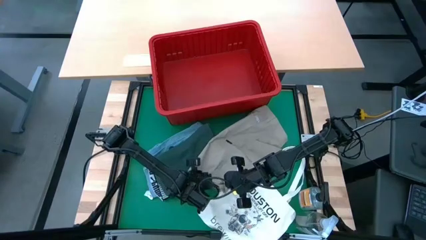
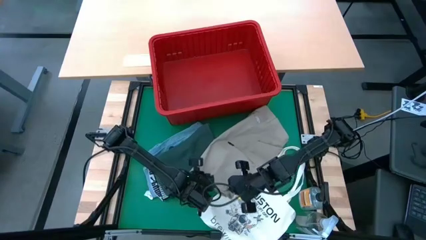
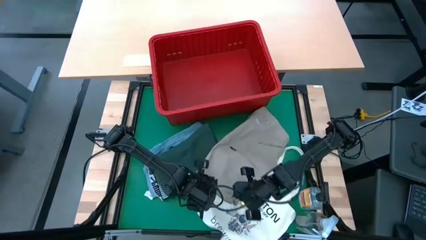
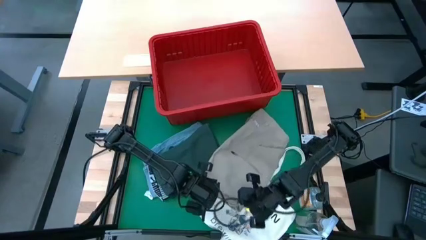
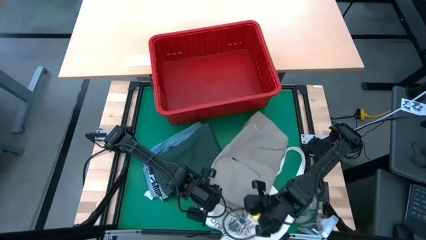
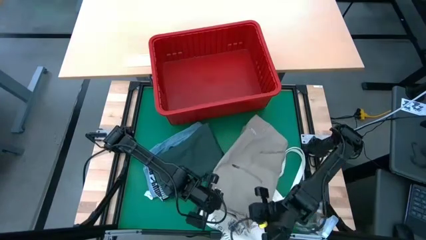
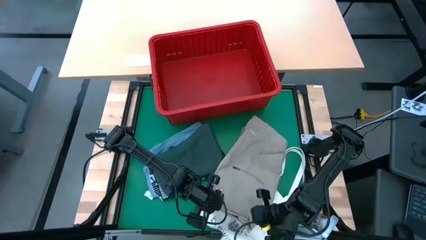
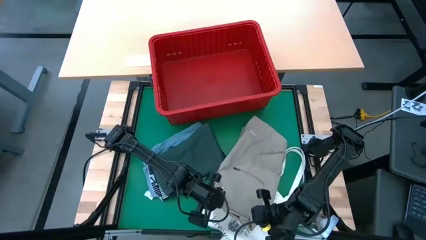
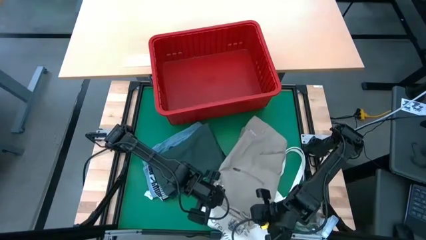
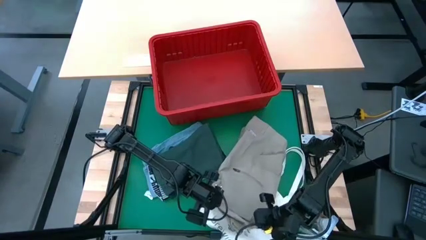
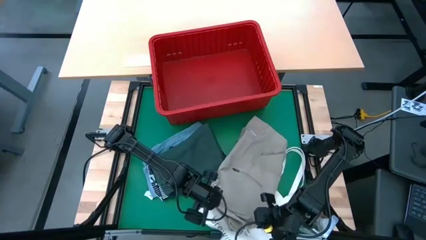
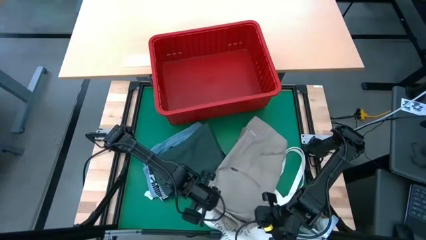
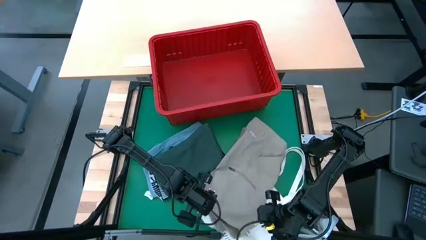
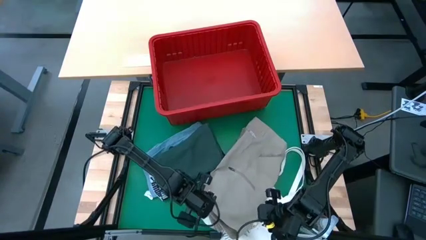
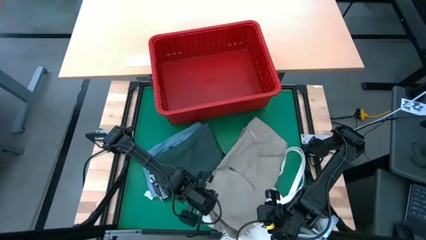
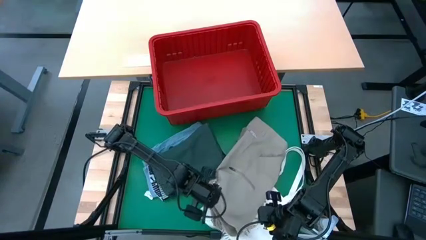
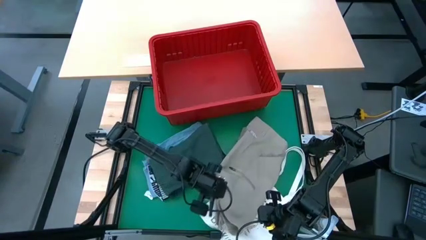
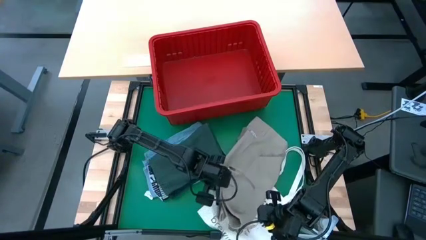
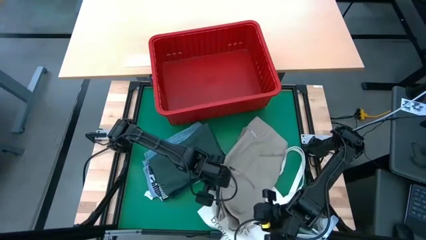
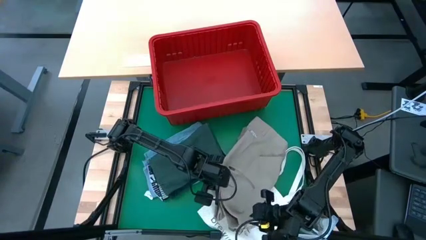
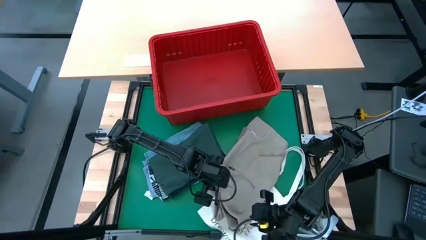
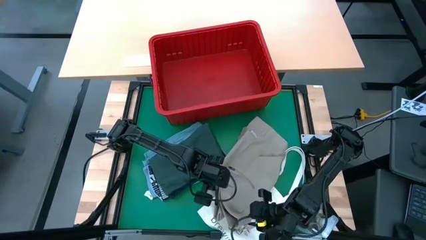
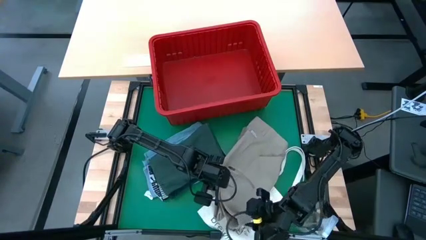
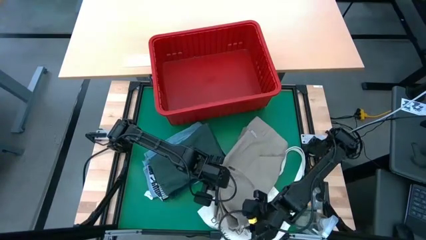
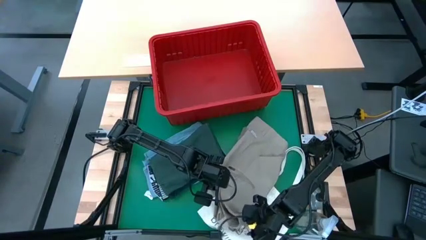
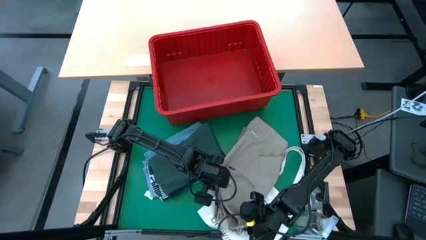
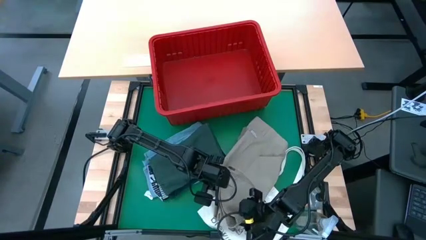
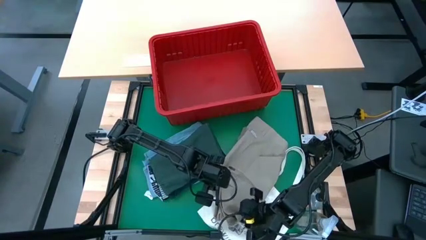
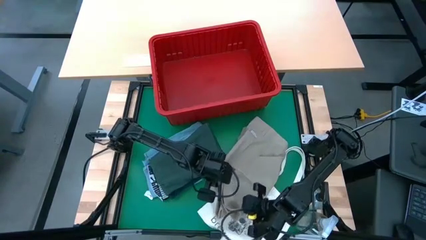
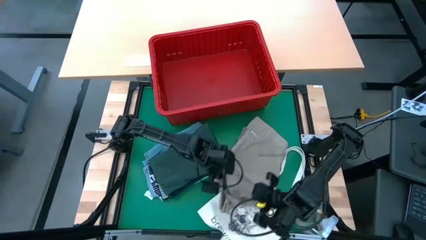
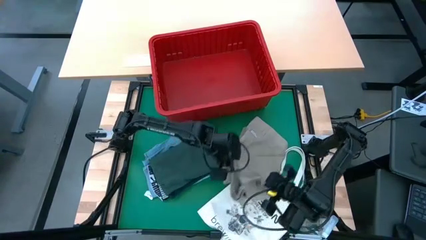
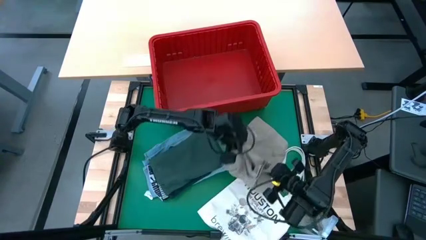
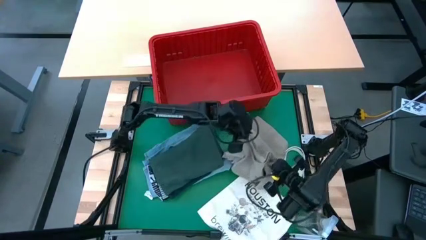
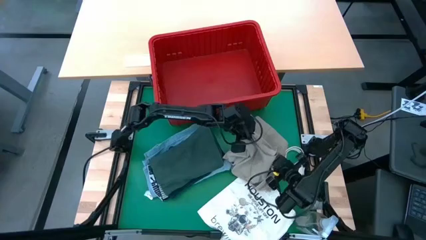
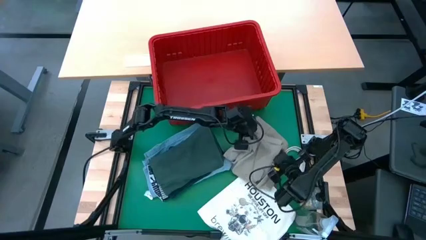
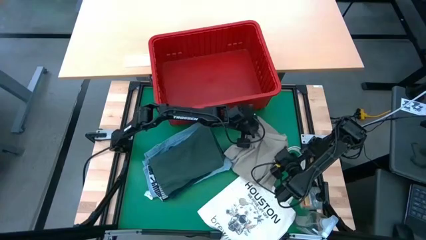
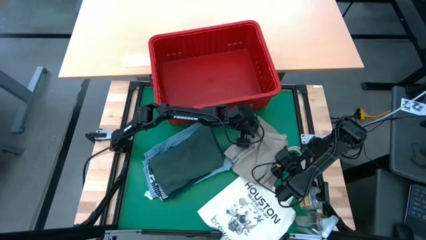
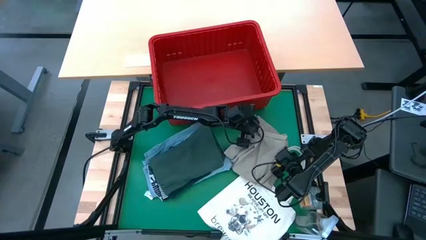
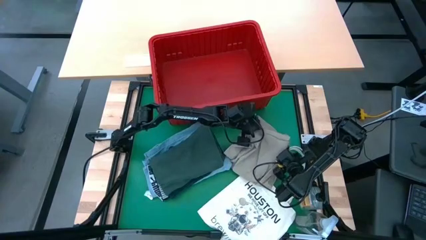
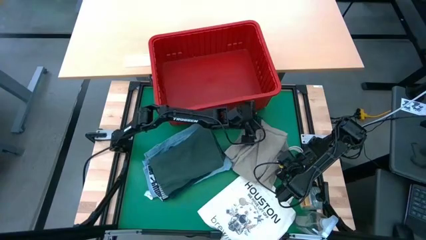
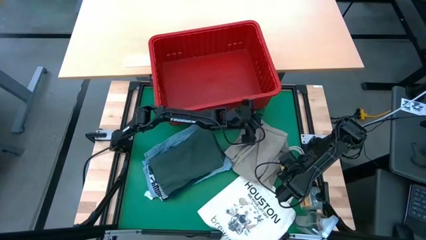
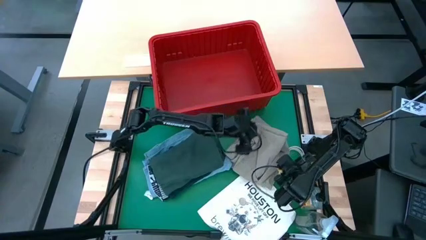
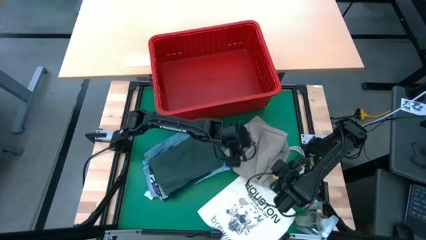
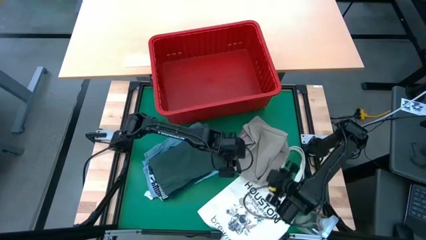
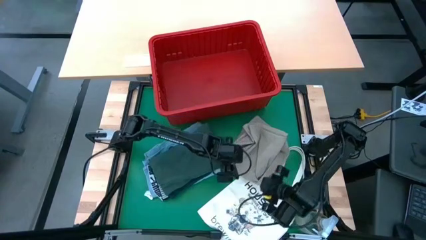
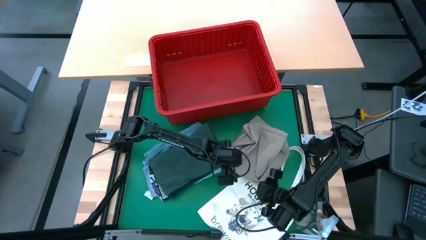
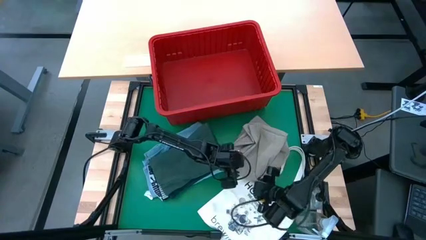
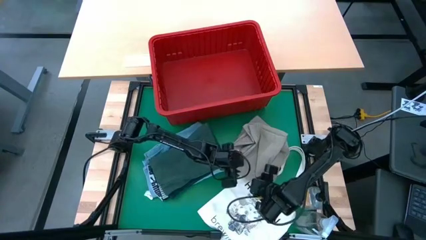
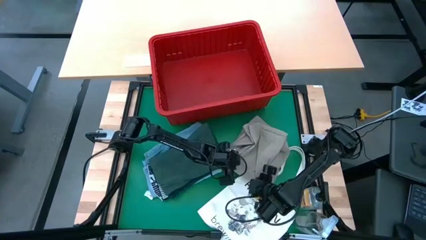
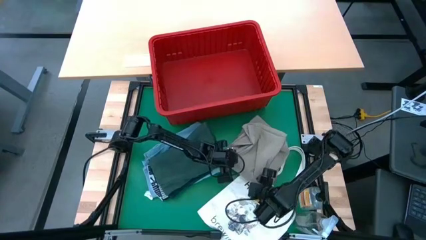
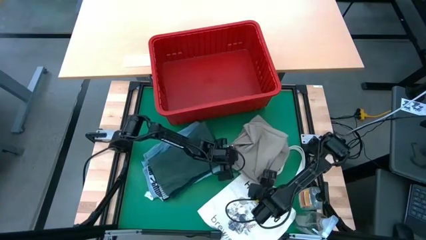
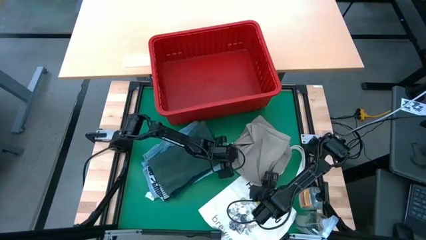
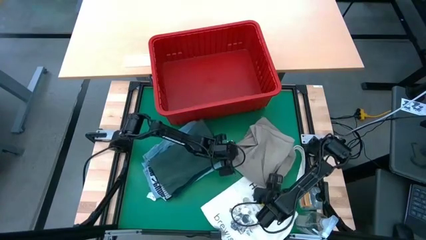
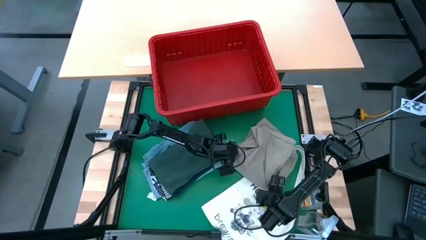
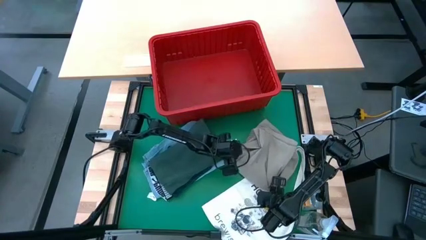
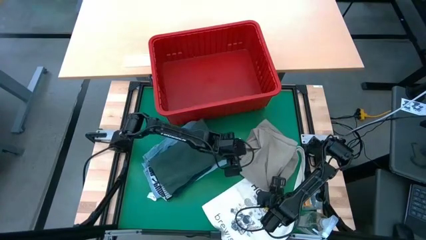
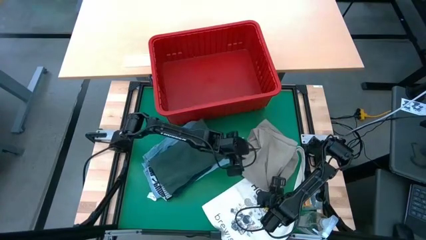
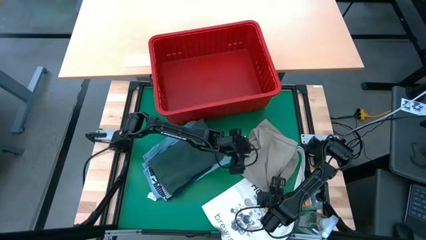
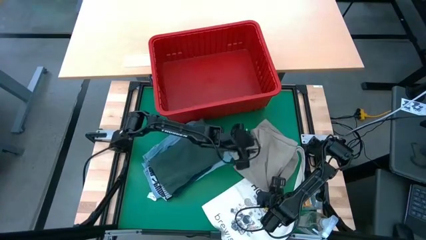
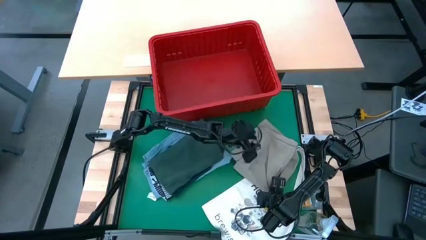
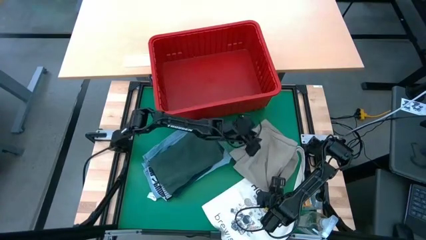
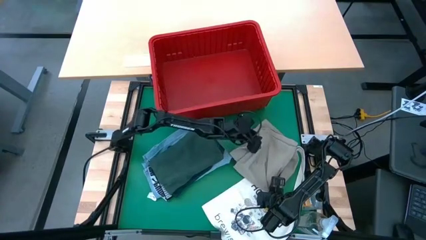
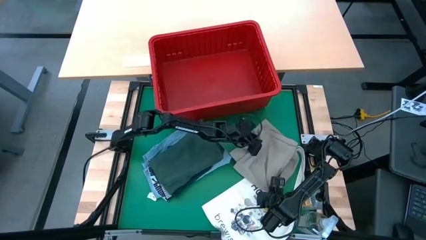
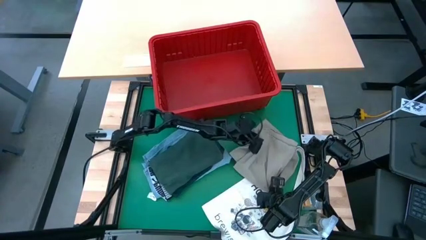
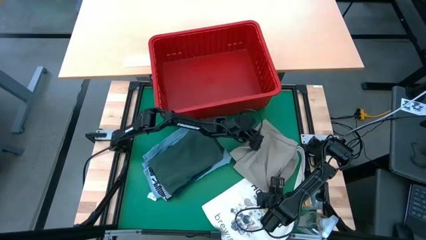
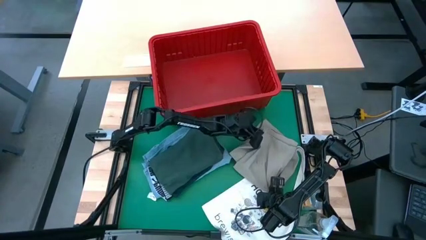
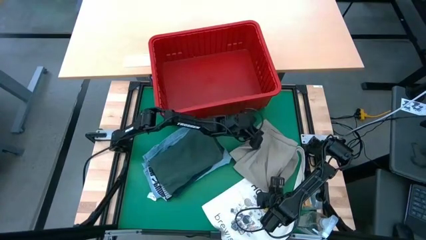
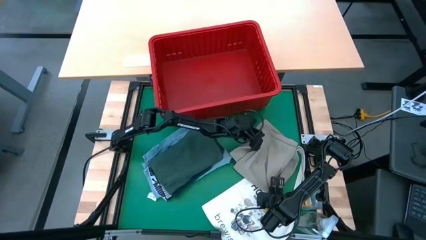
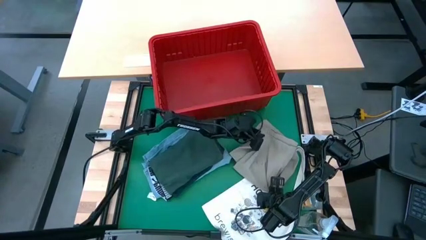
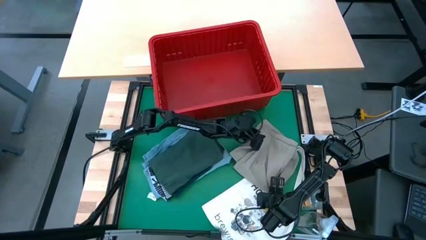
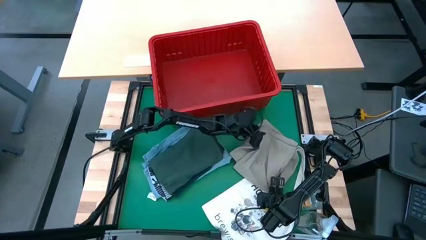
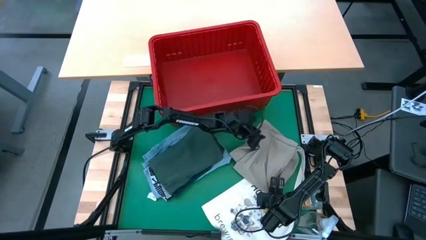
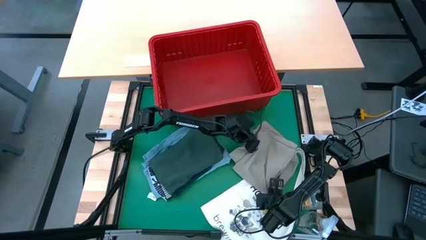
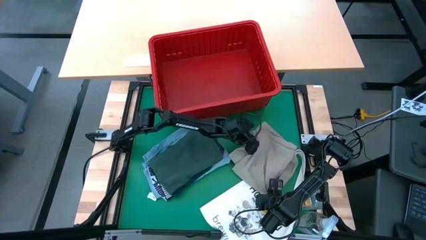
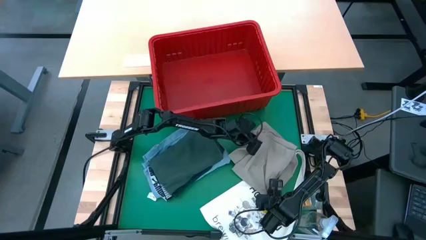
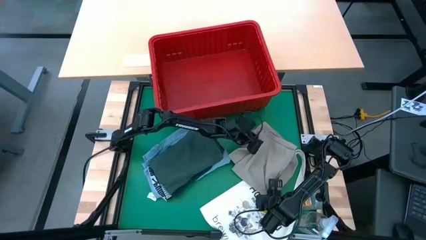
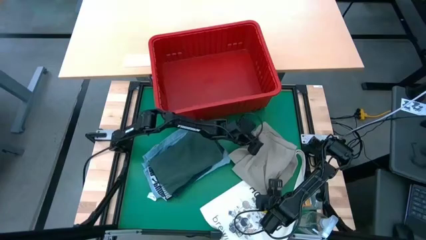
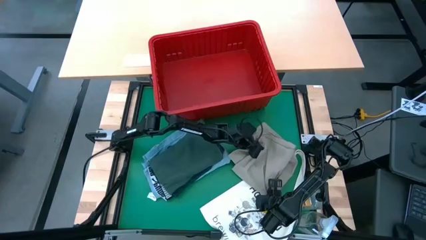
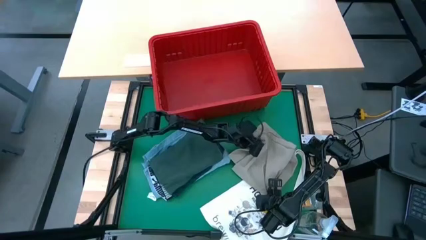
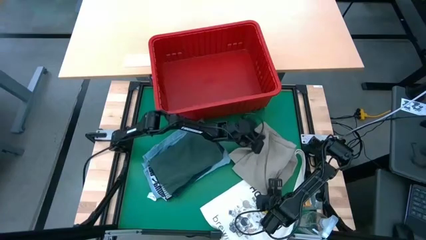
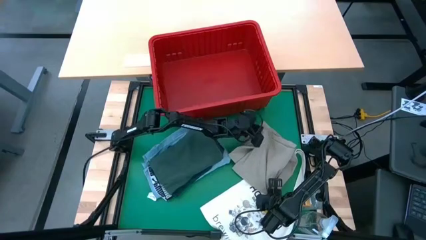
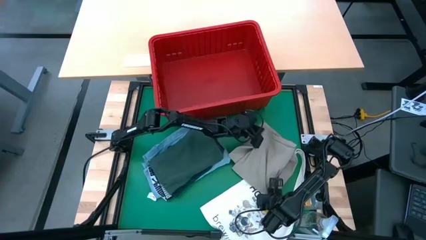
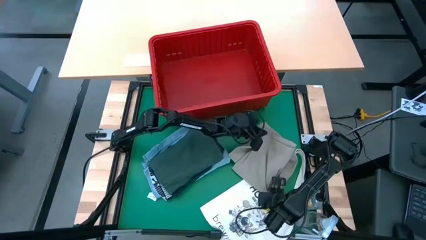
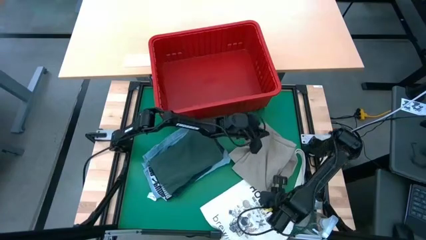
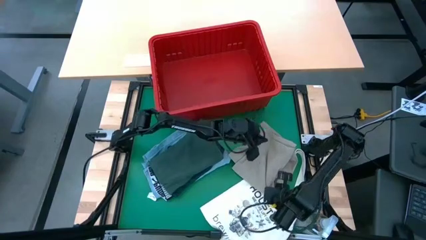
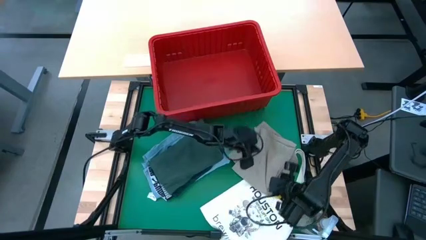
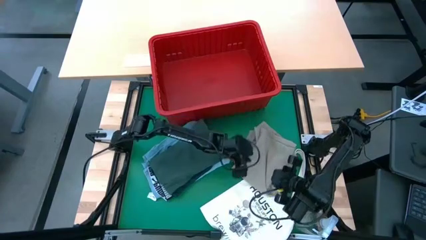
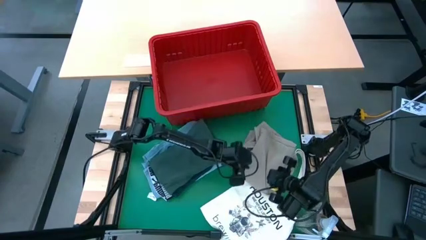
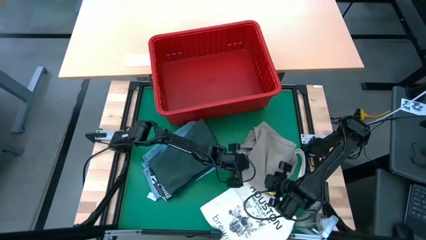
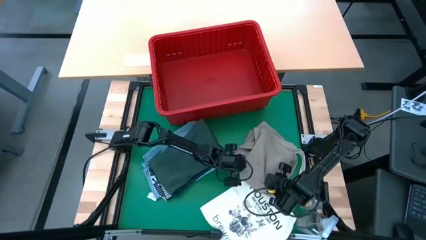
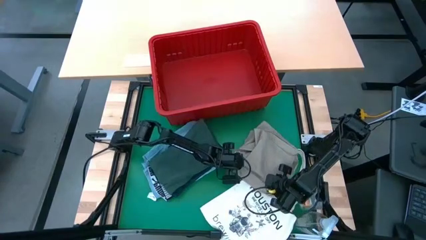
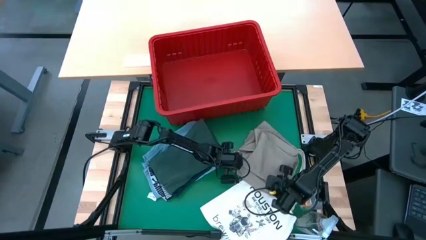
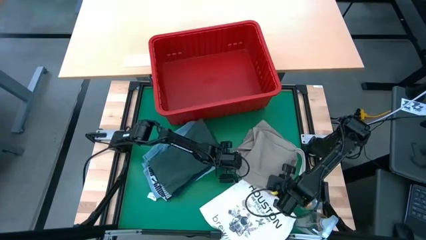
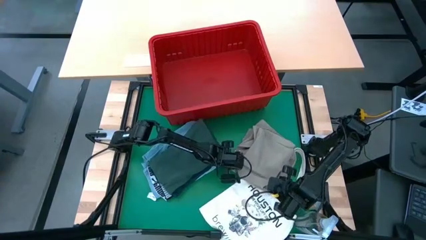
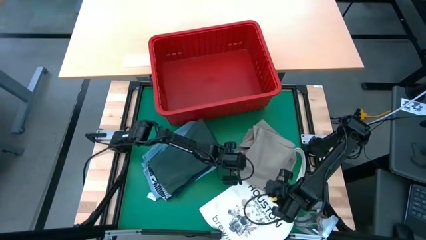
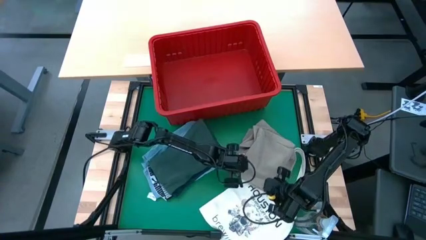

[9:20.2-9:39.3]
Task: Fold Laundry from Bin
Fold the light brown shorts
